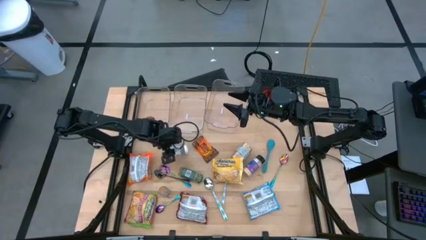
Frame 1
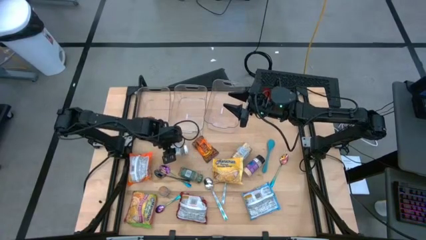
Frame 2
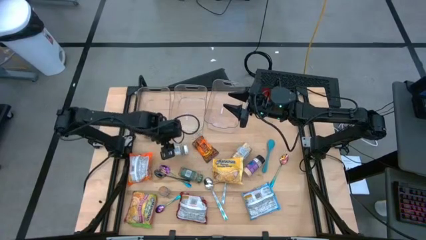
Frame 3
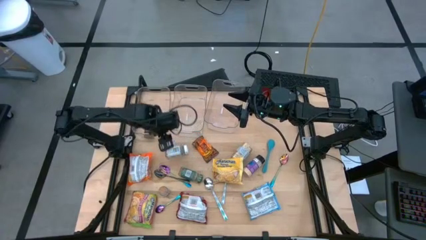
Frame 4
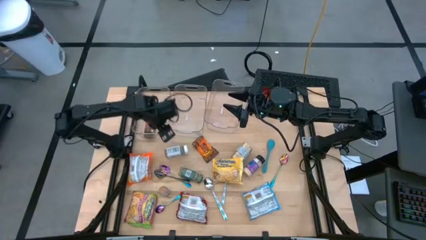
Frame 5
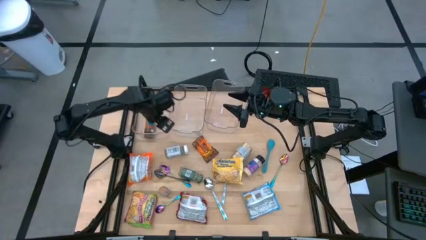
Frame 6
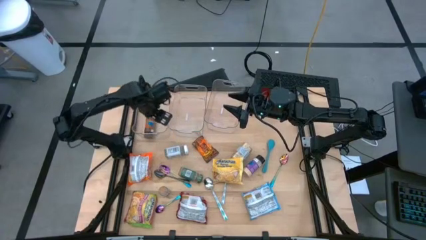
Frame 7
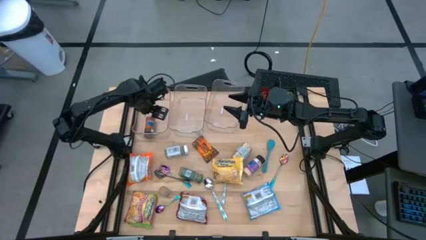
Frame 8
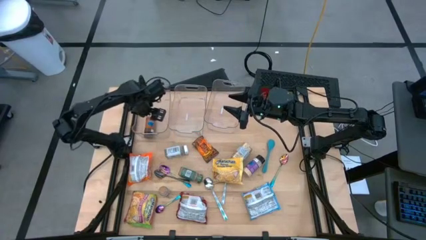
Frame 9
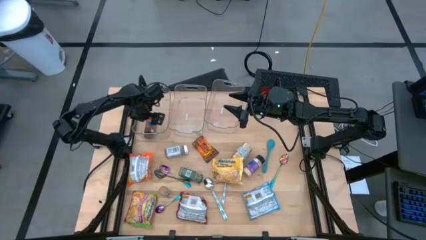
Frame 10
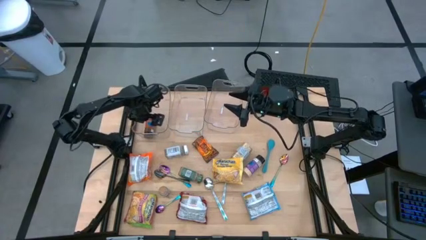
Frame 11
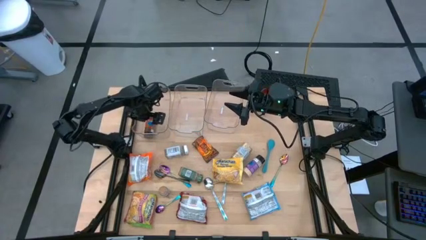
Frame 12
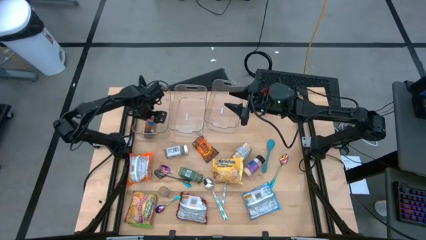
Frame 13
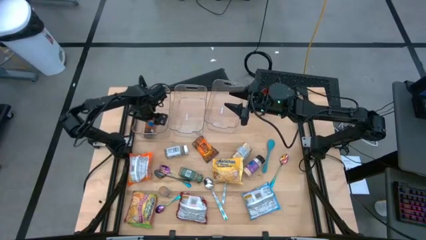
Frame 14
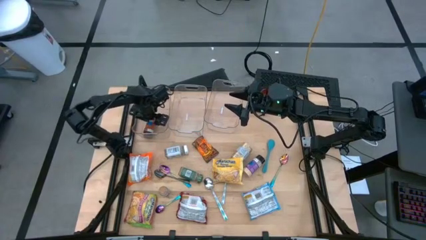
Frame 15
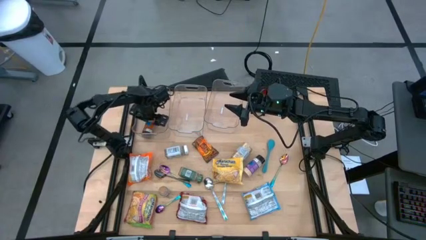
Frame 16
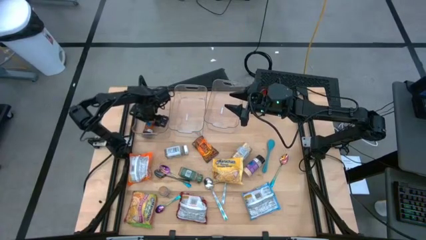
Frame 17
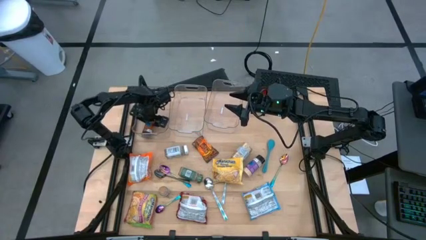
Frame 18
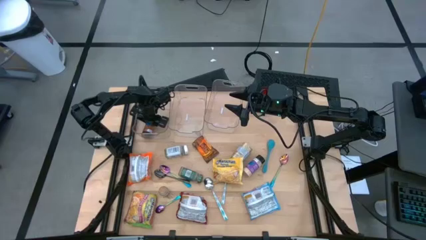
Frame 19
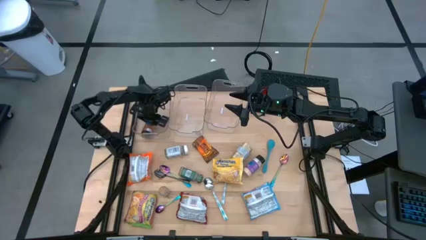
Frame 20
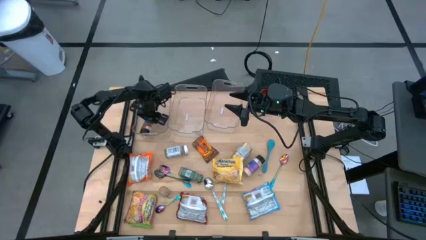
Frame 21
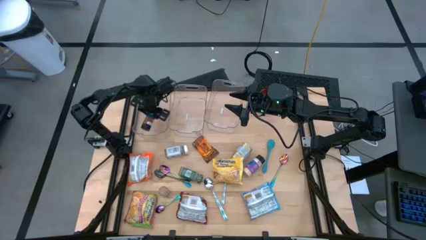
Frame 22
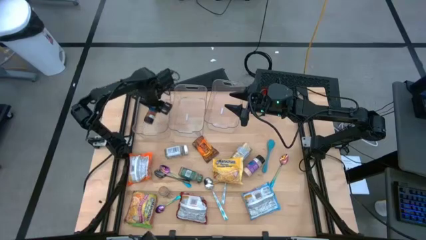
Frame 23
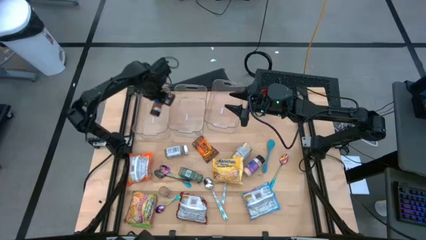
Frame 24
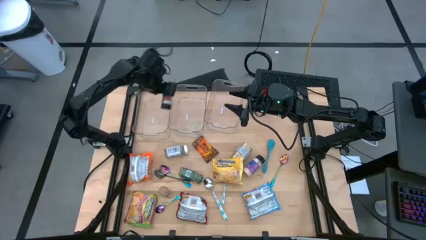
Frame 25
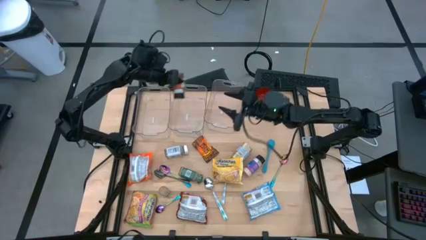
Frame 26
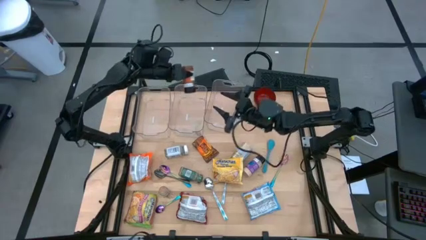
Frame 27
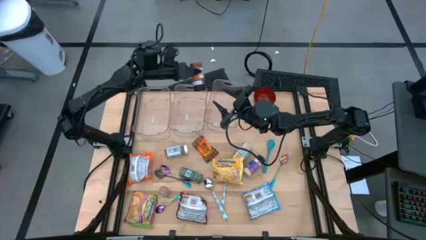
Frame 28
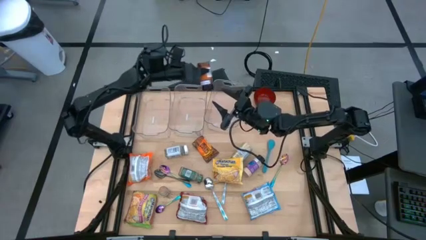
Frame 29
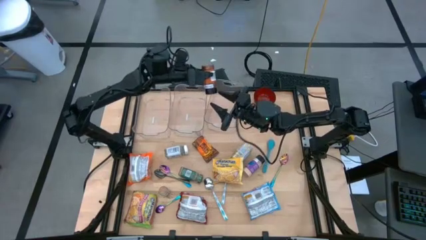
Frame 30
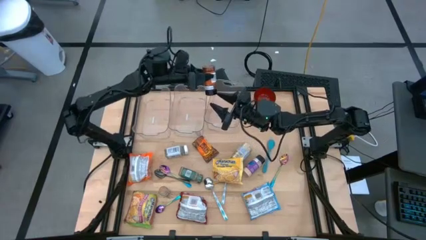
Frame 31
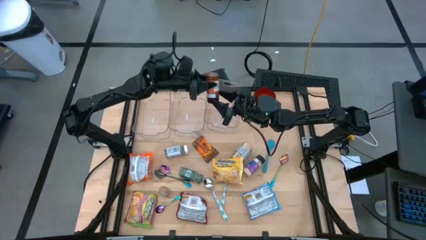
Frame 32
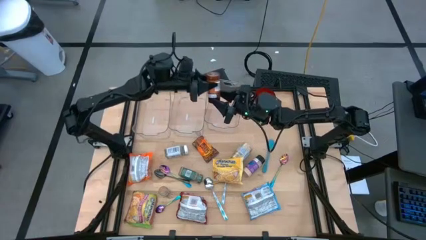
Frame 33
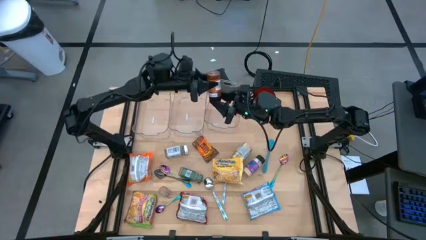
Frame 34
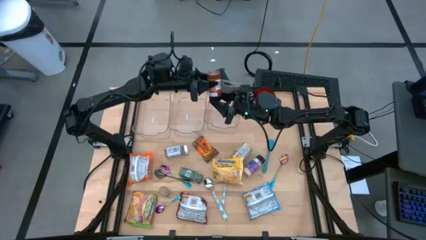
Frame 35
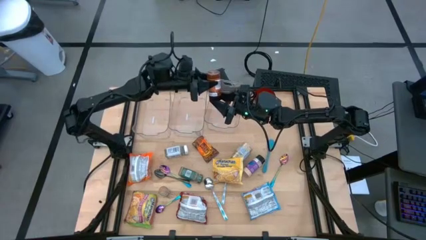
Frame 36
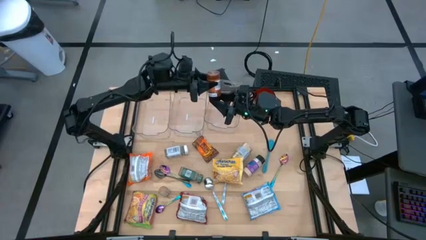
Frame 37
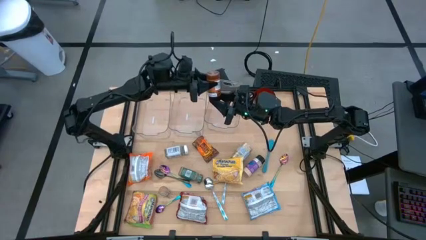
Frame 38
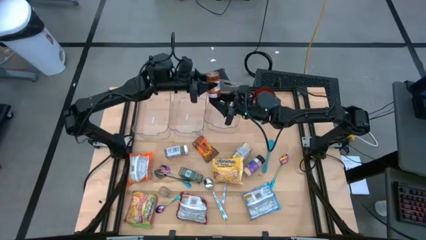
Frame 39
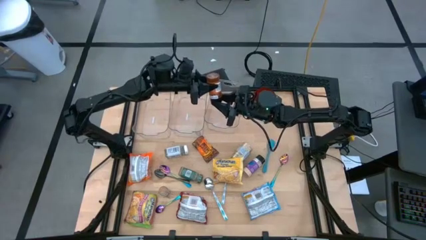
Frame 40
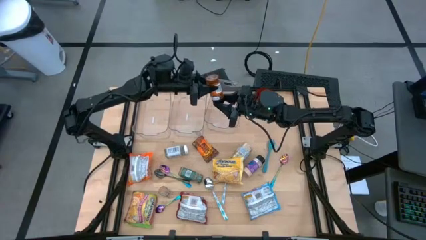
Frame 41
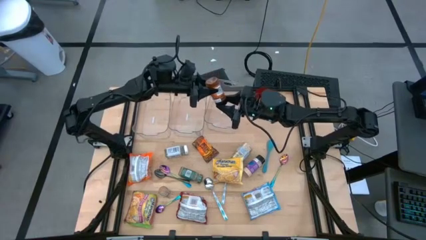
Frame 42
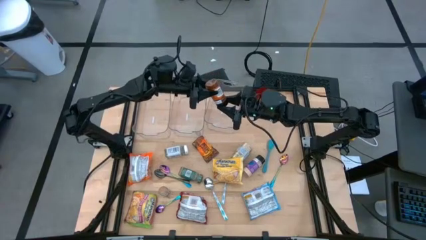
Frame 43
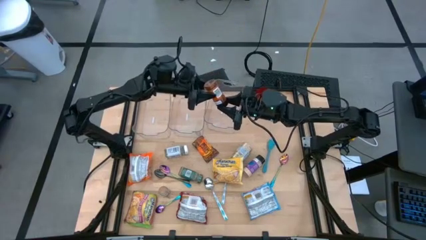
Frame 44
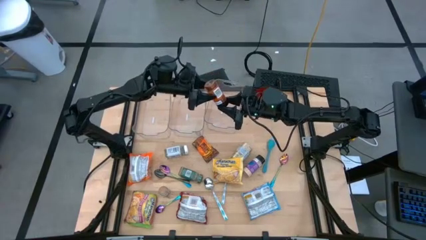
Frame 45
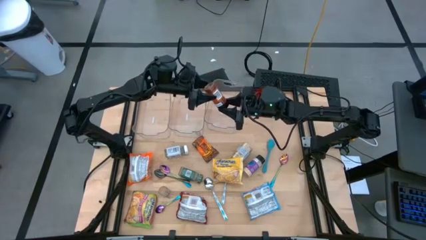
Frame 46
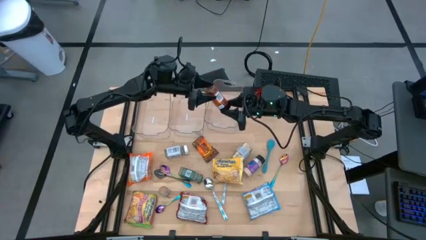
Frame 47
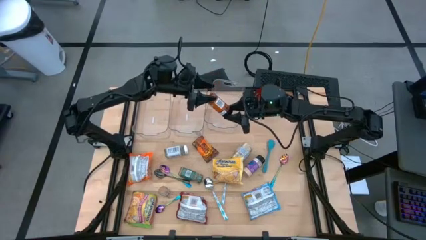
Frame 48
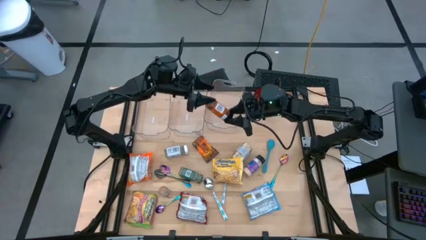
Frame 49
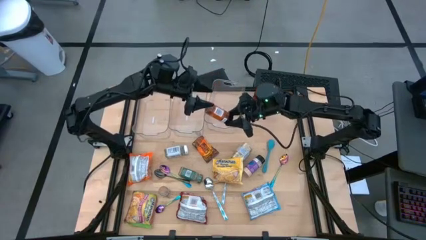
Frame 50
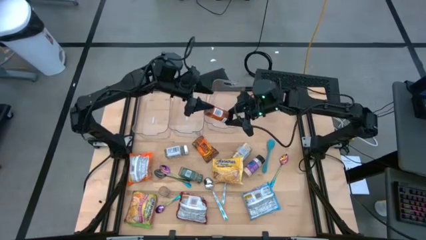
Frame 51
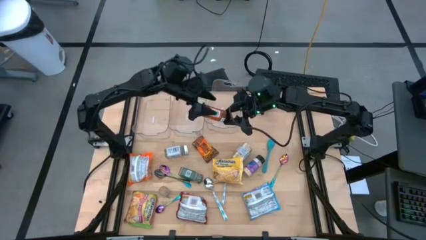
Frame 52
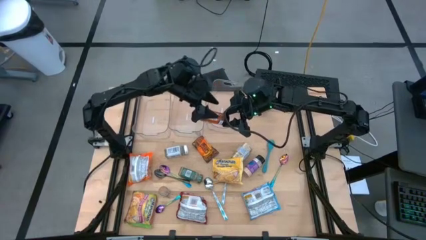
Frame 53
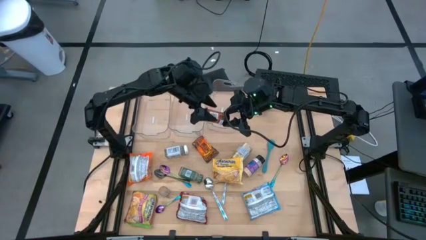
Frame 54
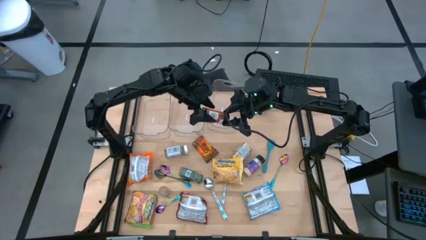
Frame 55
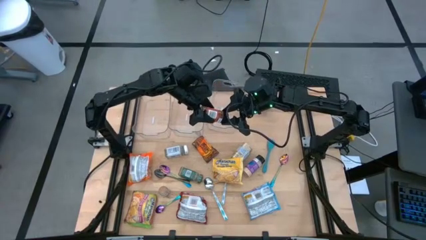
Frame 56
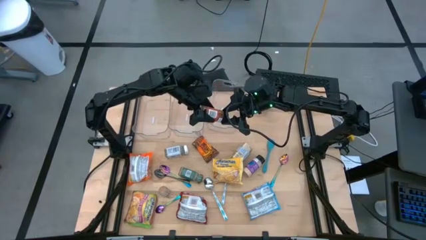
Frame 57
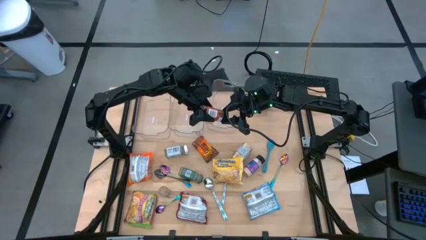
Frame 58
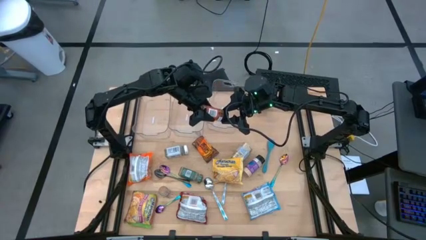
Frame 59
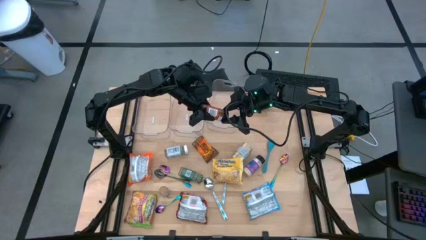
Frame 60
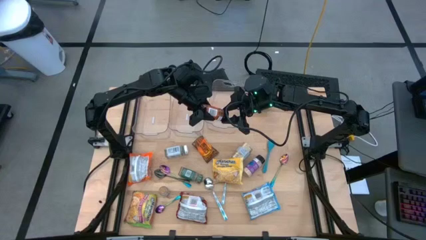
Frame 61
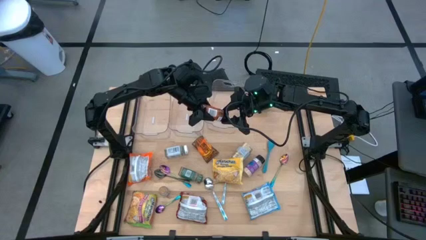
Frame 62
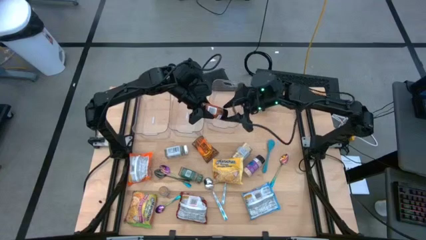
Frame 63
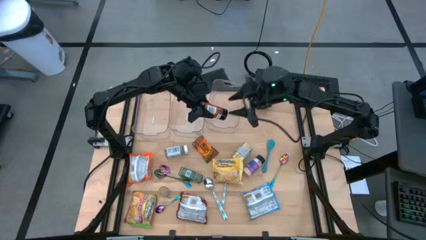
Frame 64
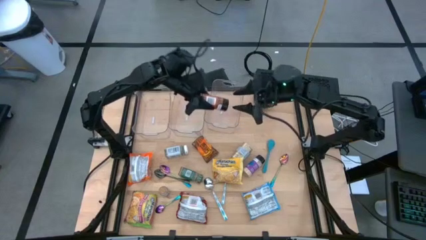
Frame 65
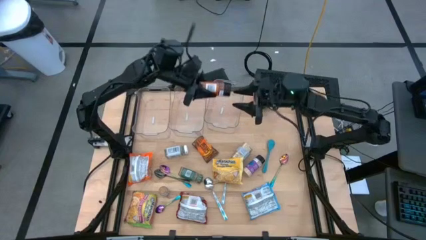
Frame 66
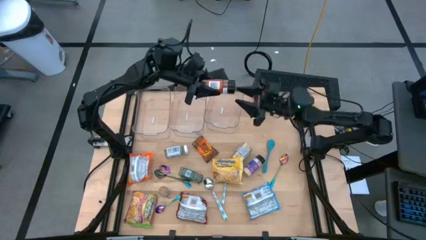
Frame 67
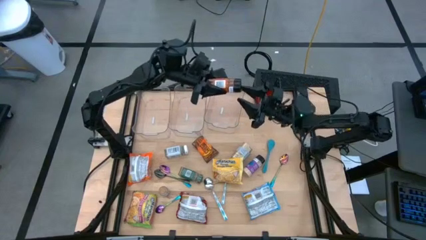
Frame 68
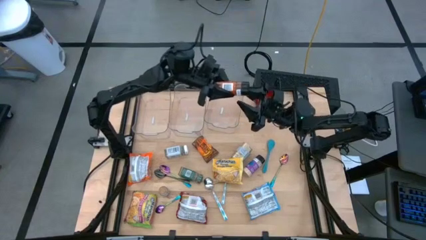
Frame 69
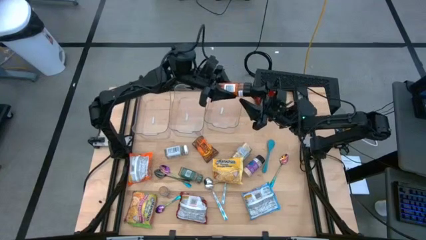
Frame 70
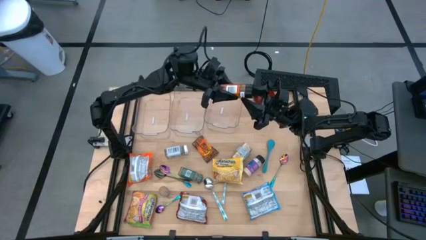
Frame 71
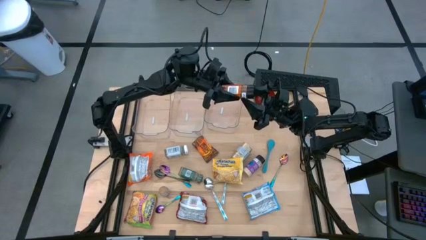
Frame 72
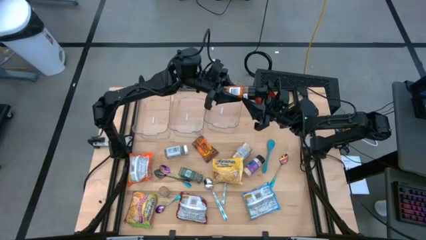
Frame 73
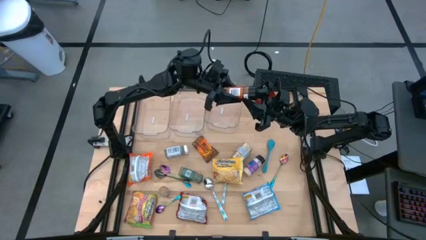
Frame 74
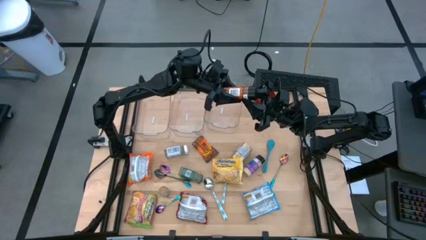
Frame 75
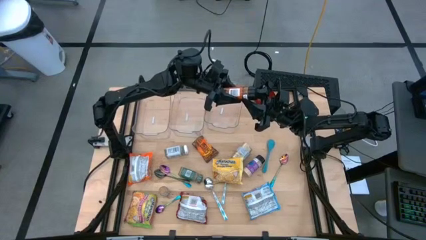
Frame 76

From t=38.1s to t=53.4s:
Task: Pick & Place Food Item
Adjust the orange spice bottle in the left transparent bin
